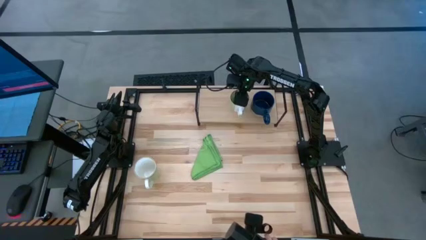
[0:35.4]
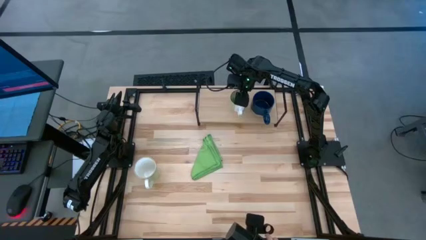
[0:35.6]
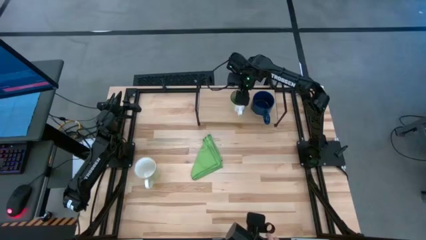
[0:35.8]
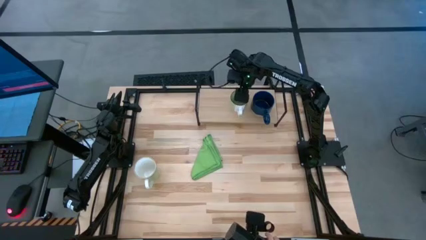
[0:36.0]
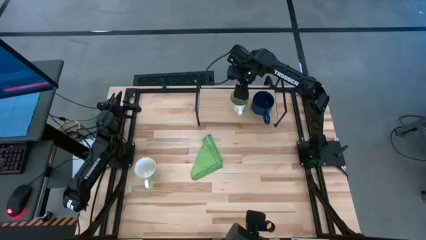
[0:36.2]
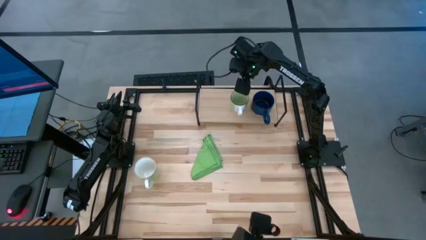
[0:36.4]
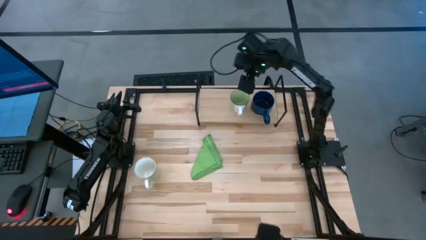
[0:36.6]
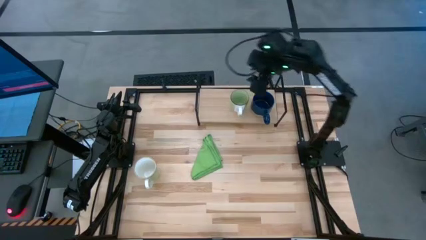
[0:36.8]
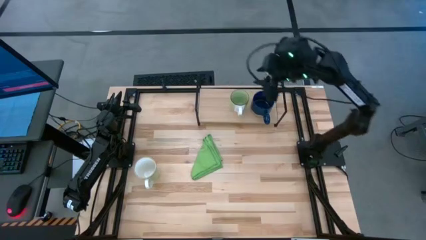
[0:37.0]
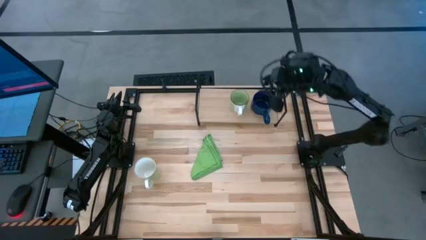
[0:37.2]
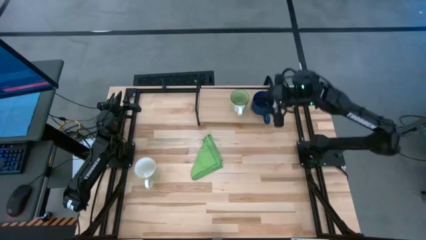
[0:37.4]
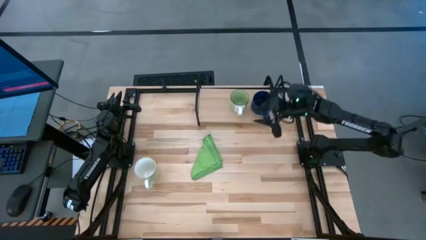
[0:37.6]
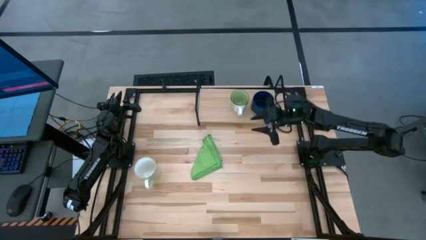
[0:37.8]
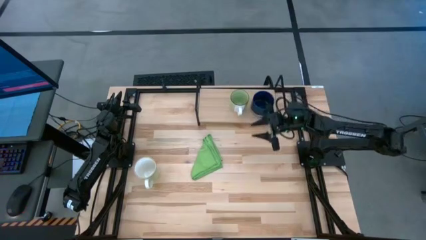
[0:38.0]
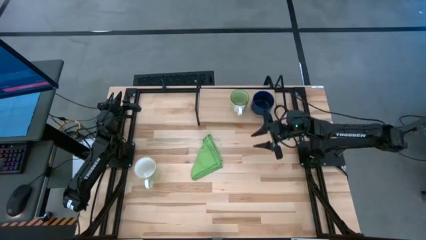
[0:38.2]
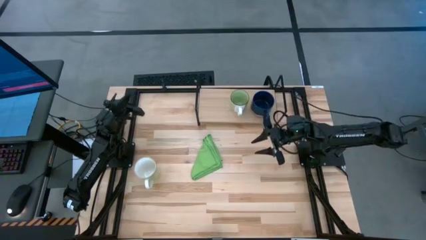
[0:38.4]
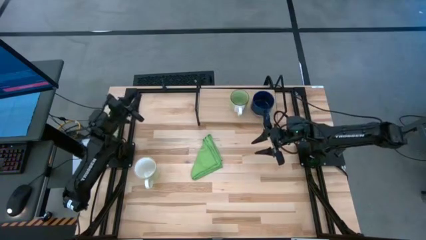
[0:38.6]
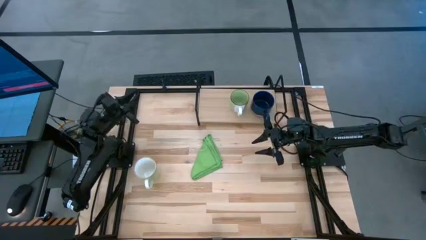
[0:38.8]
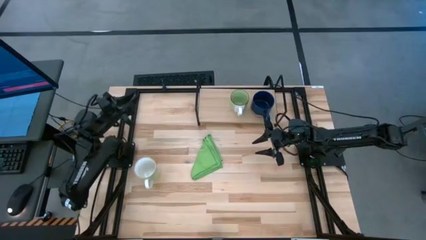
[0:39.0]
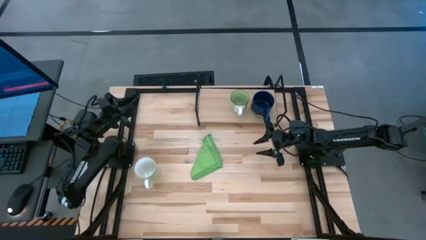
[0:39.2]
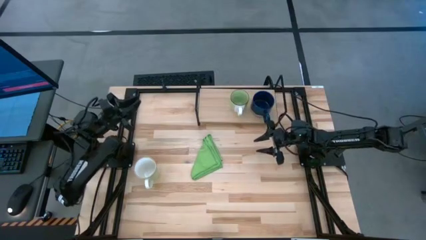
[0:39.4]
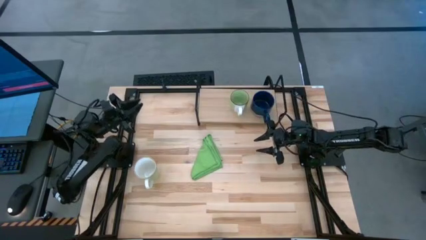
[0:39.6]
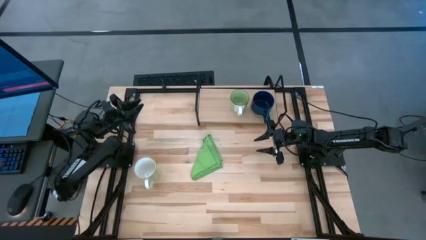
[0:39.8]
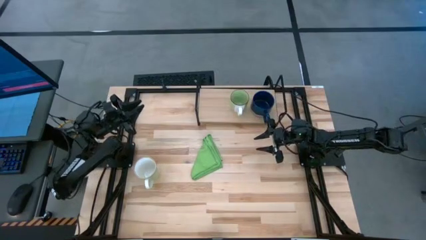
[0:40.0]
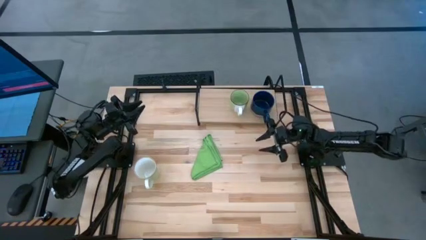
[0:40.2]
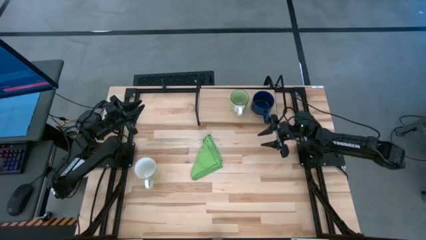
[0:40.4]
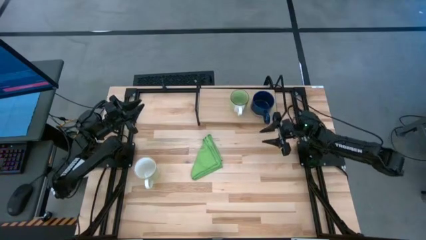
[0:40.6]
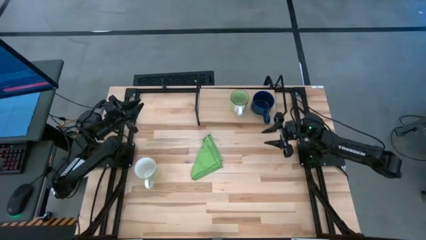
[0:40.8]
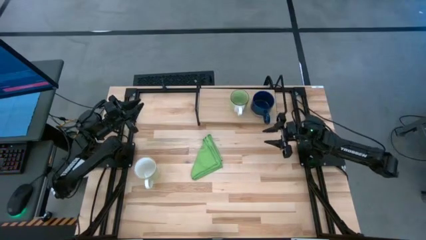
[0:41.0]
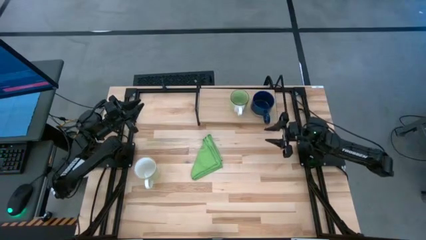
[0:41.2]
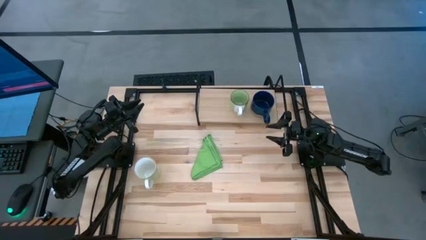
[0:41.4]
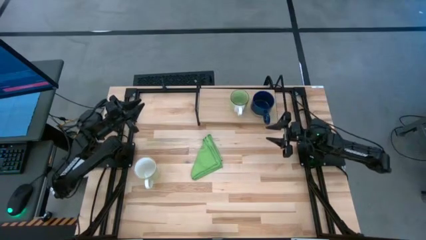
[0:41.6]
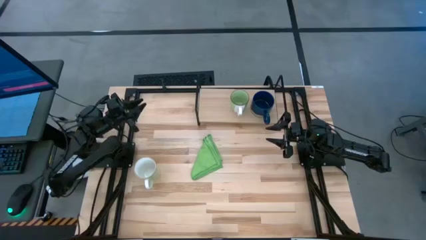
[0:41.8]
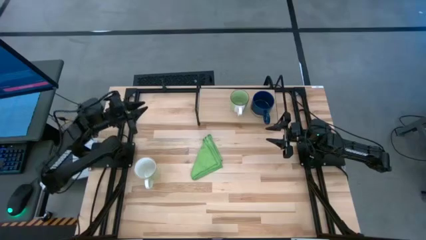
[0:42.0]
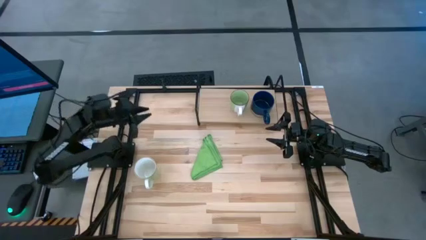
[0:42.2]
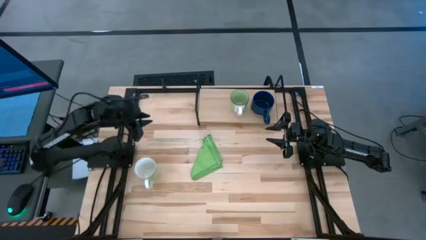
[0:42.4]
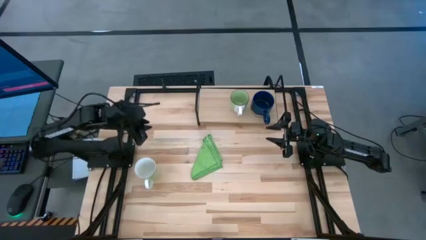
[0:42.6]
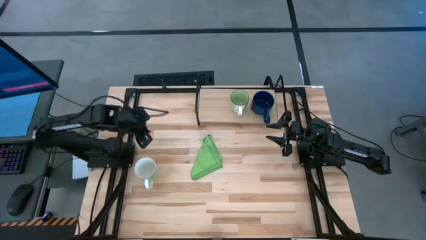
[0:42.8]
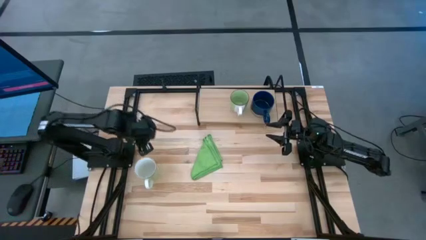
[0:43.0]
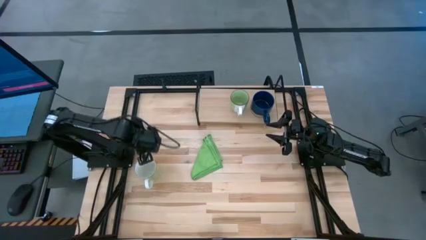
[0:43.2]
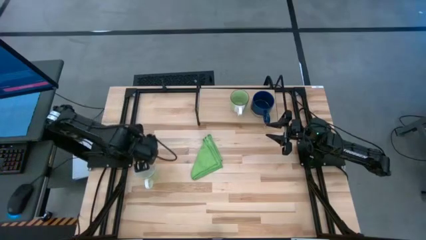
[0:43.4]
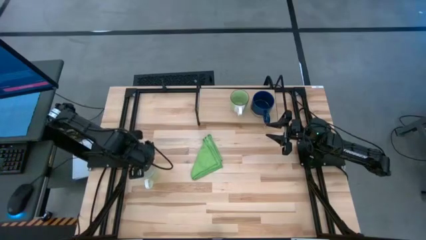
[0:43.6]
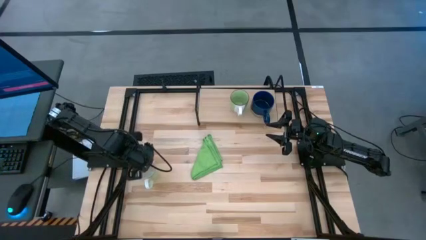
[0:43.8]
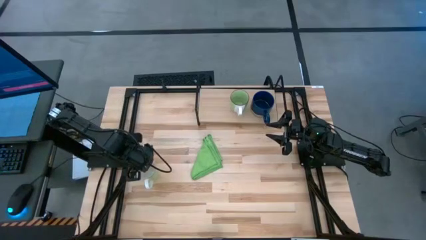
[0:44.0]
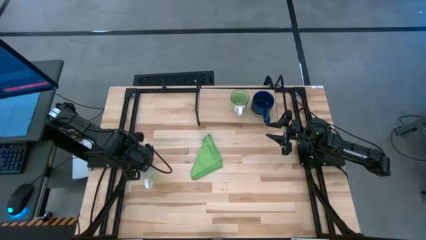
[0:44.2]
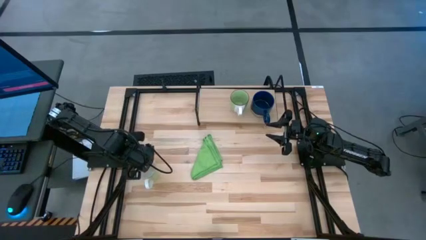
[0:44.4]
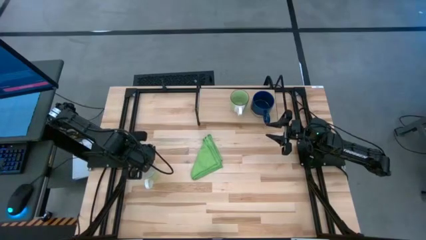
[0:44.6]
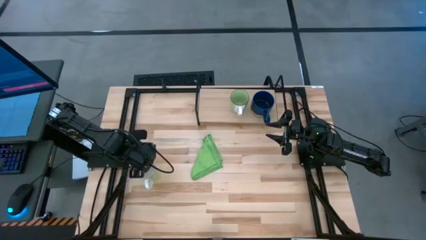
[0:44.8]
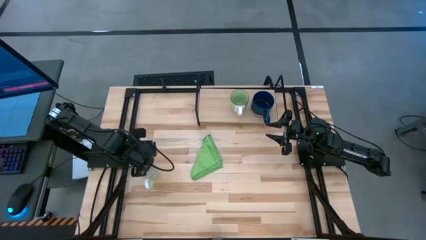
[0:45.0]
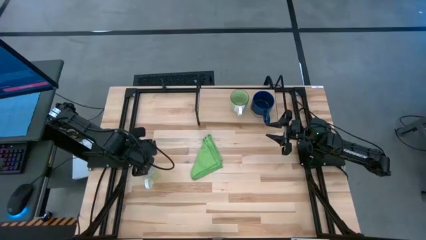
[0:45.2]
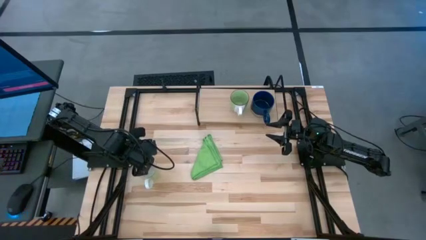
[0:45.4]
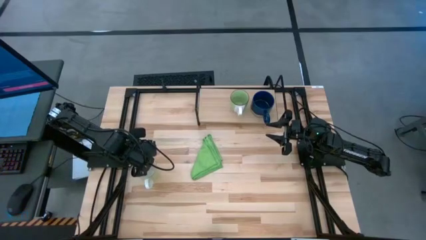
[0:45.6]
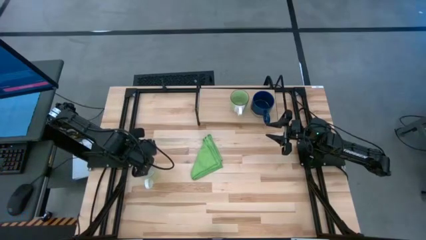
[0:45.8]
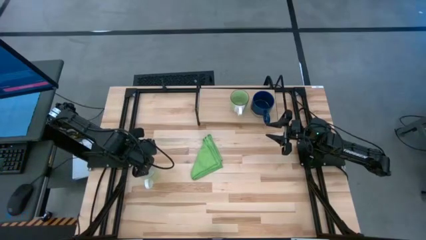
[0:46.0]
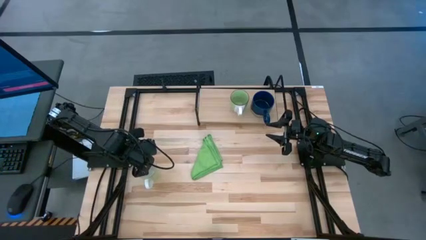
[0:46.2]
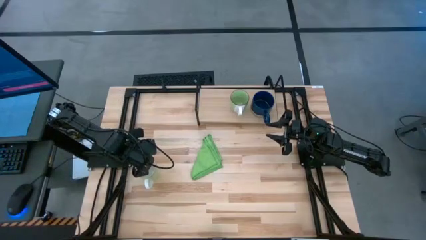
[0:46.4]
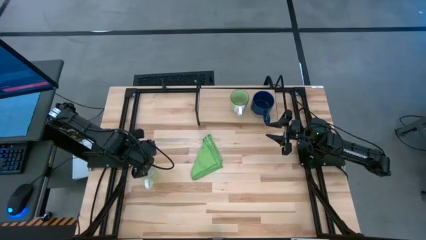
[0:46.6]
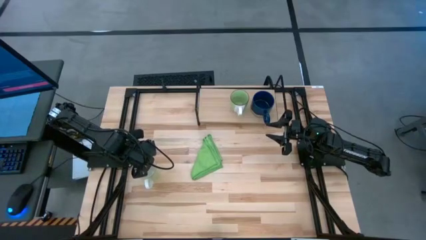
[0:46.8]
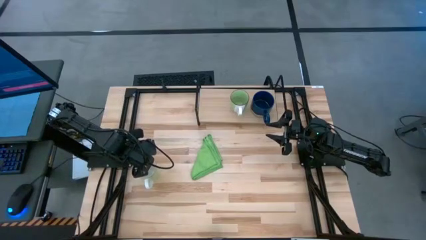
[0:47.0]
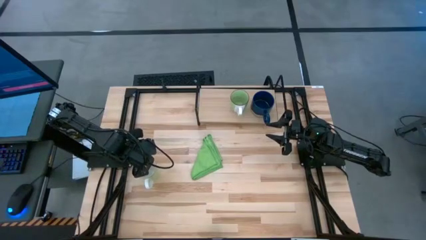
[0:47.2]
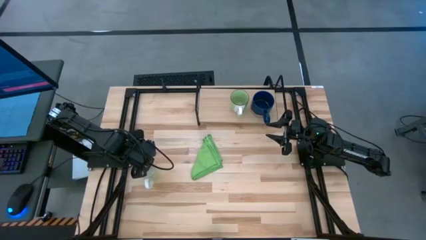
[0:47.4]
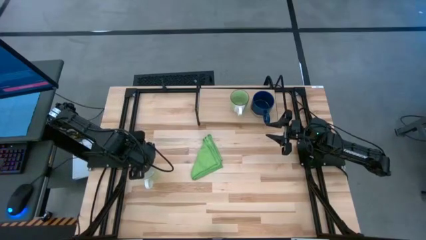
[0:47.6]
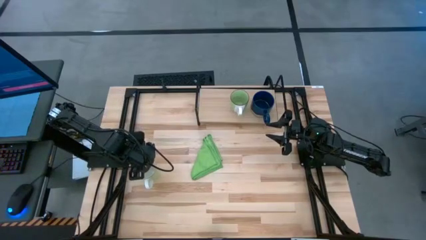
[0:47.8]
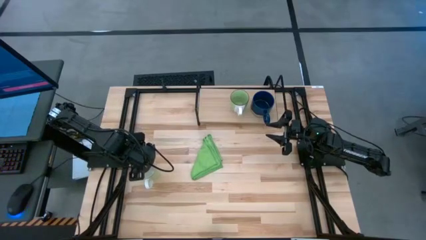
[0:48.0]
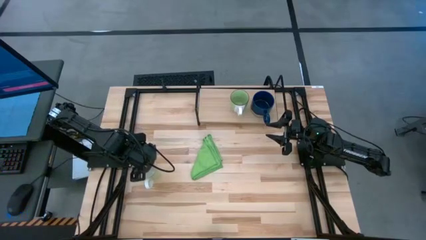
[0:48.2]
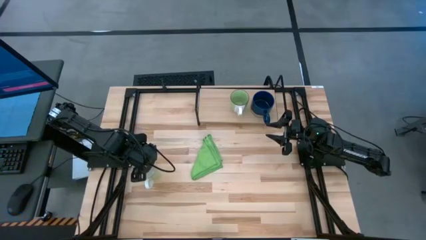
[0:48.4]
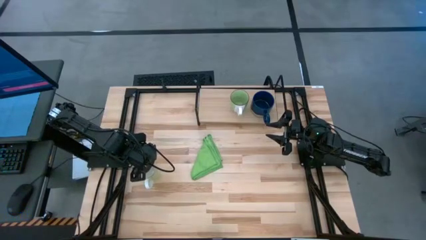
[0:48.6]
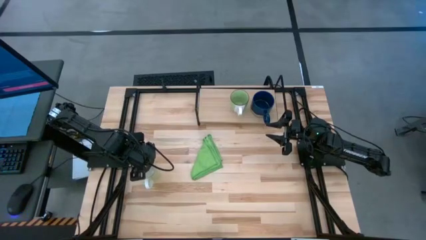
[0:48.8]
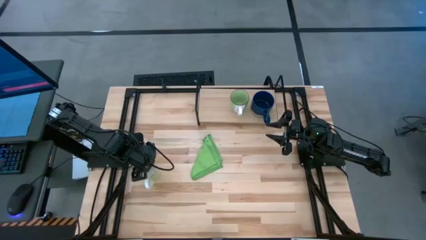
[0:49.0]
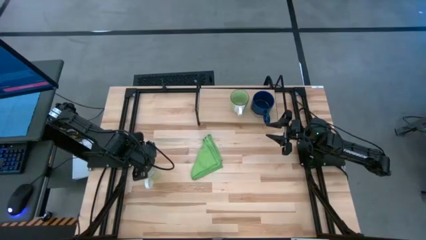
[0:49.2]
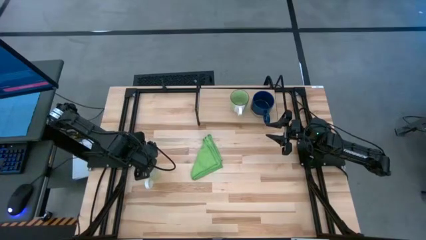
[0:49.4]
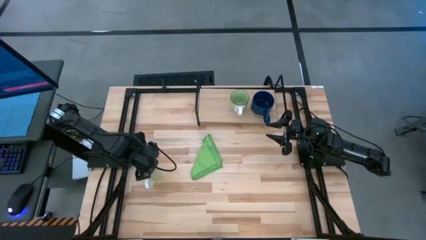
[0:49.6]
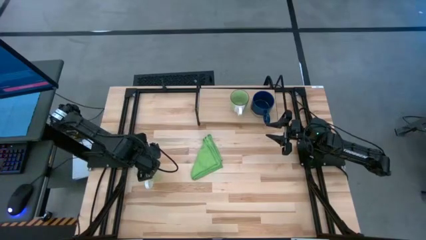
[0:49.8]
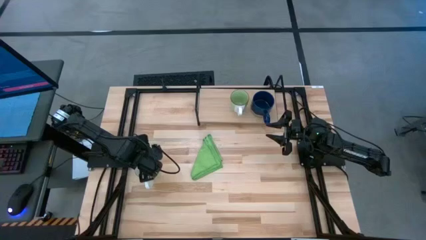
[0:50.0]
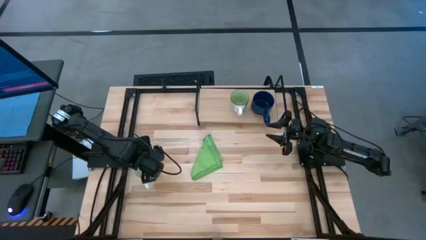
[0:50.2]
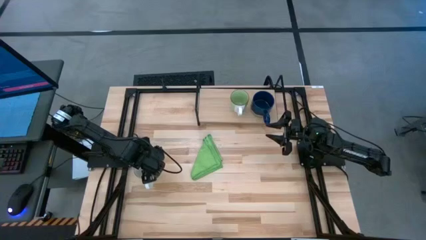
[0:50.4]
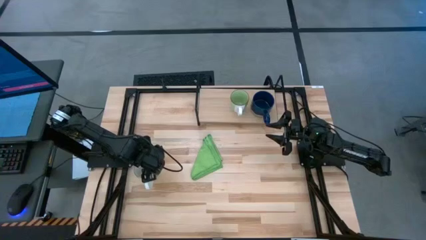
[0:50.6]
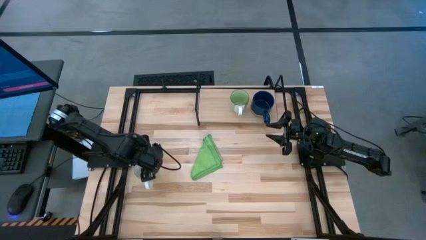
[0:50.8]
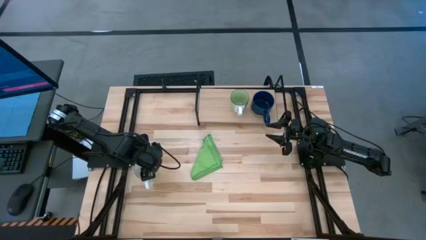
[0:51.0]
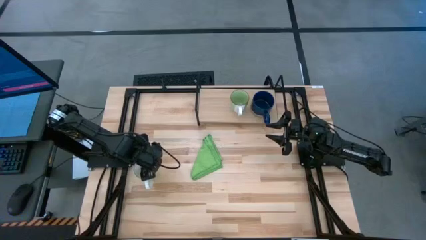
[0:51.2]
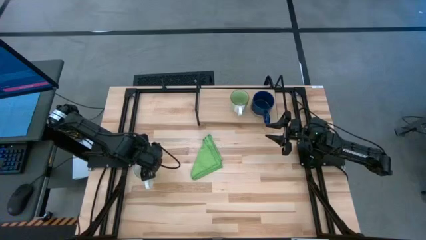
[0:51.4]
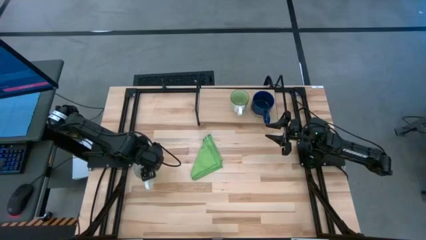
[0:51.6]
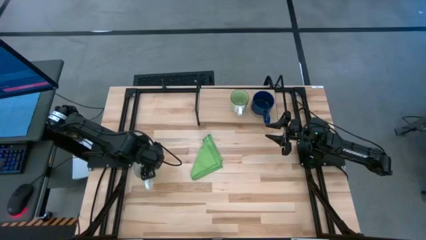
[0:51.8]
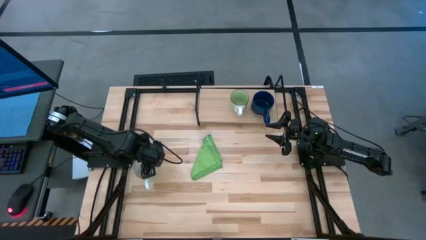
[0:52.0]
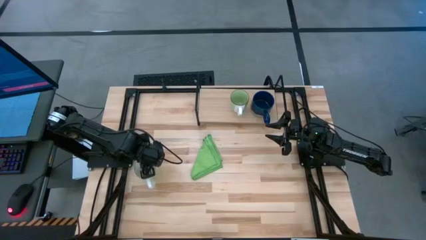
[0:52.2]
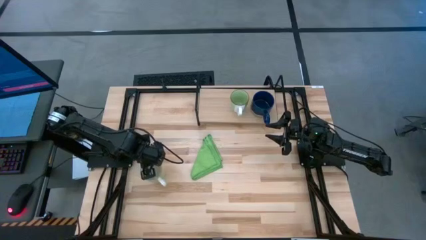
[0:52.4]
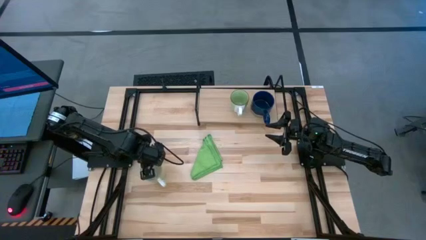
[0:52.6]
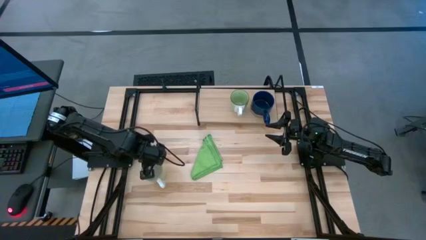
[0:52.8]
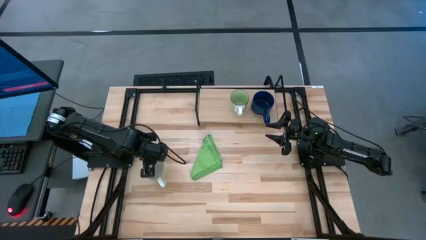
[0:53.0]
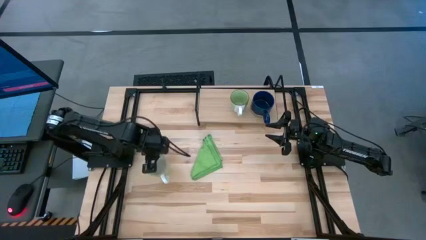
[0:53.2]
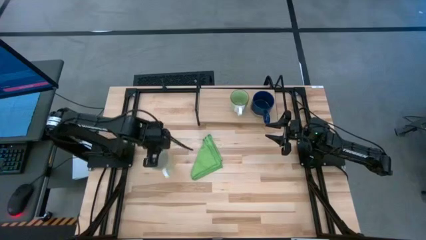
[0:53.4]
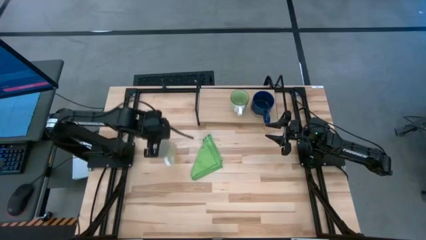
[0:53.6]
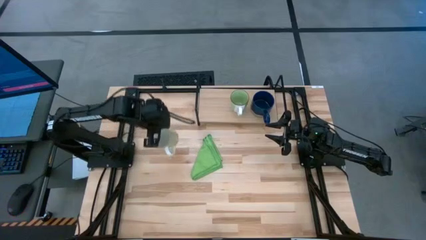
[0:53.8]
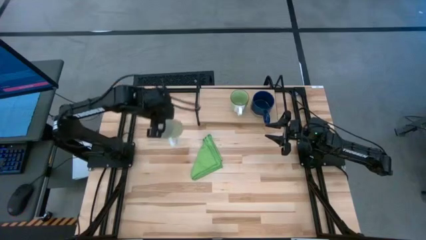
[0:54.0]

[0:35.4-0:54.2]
Task: Stack small to large cups/mugs on shelf
Put the light green mug on the shelf
